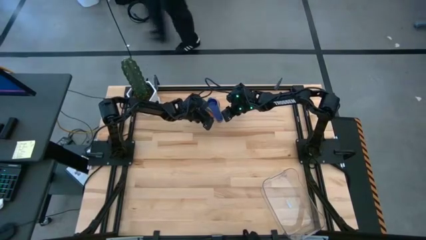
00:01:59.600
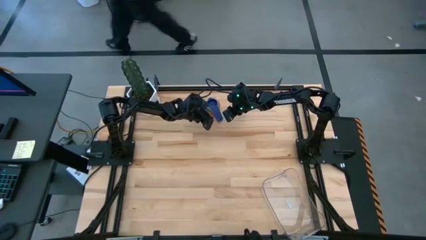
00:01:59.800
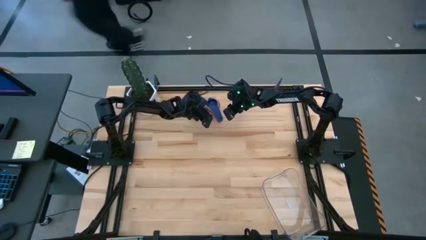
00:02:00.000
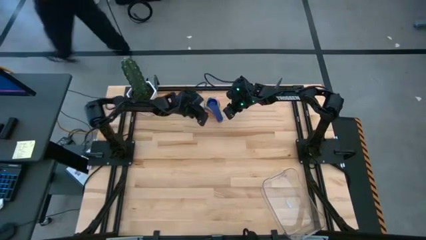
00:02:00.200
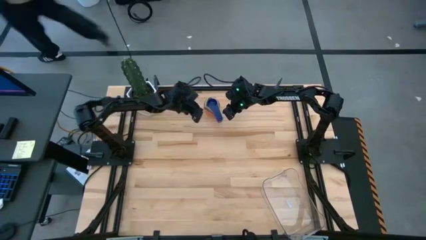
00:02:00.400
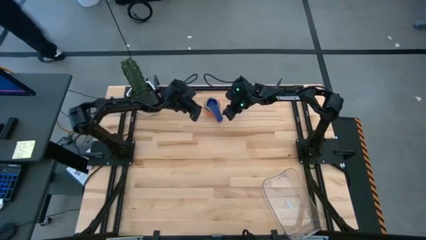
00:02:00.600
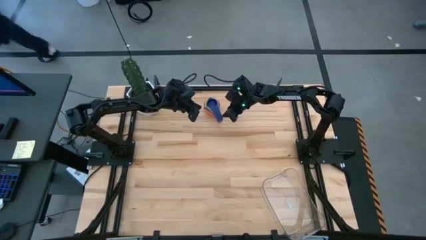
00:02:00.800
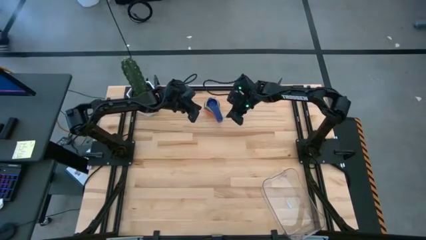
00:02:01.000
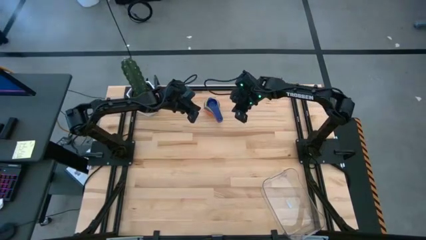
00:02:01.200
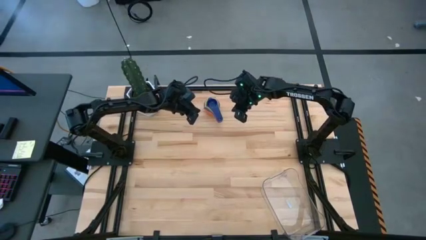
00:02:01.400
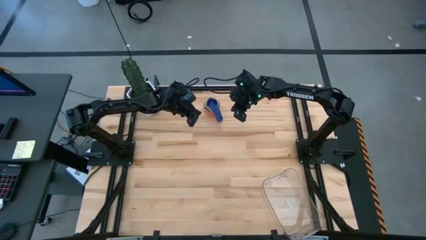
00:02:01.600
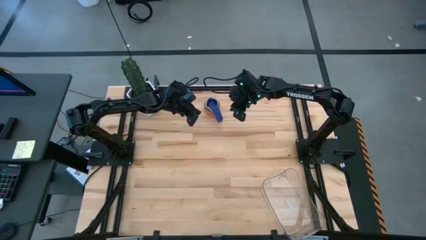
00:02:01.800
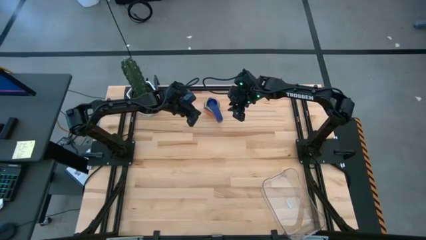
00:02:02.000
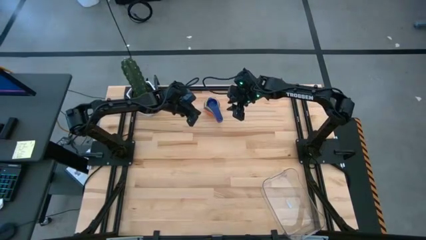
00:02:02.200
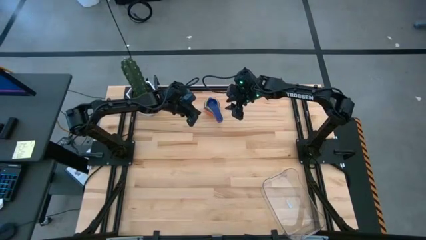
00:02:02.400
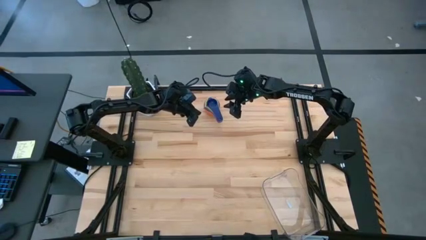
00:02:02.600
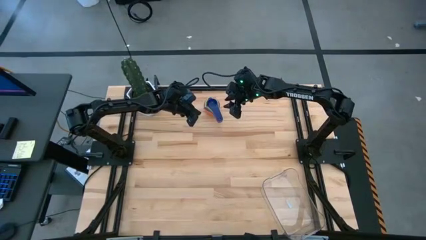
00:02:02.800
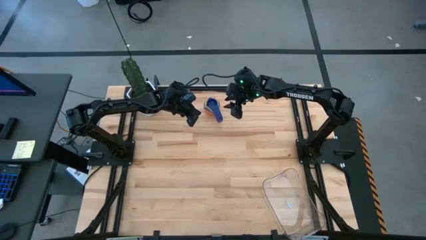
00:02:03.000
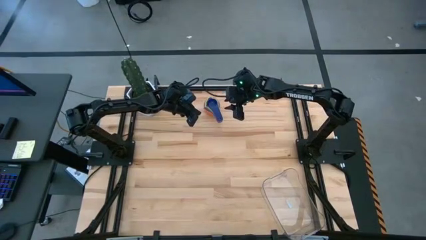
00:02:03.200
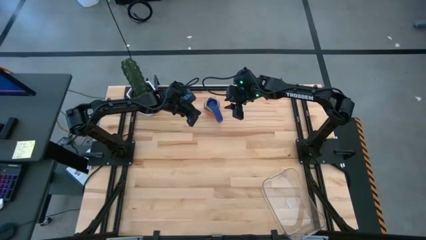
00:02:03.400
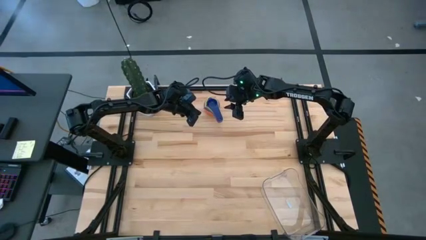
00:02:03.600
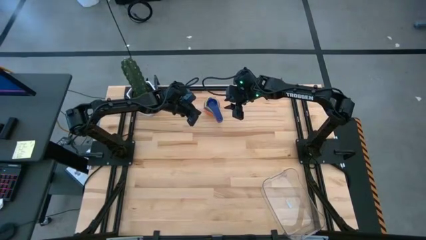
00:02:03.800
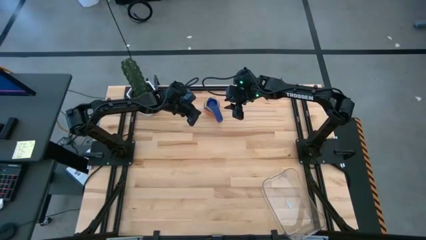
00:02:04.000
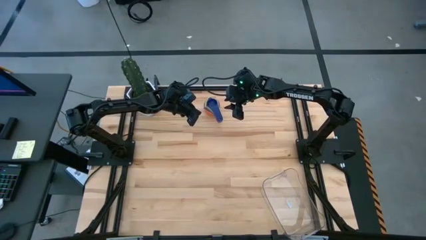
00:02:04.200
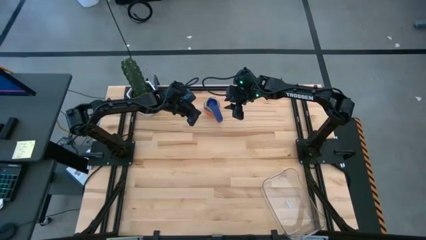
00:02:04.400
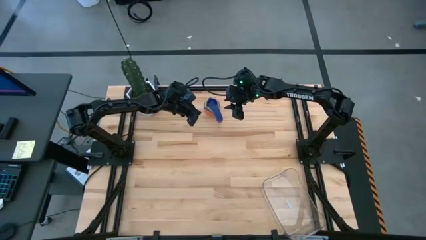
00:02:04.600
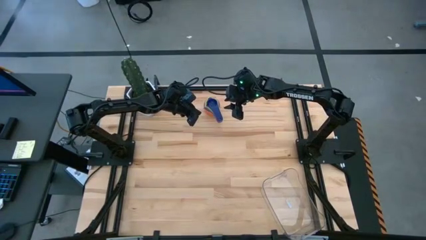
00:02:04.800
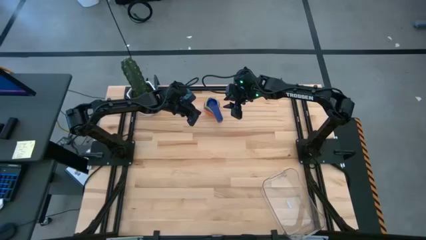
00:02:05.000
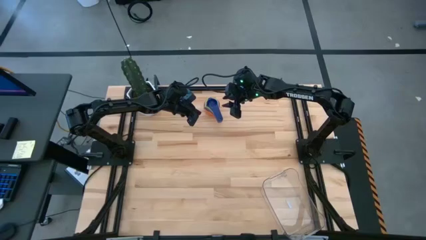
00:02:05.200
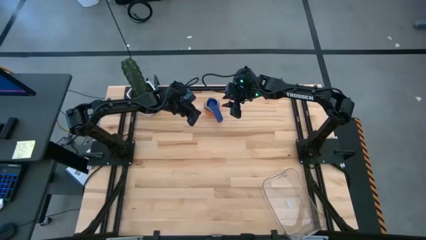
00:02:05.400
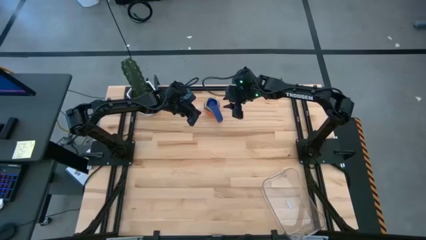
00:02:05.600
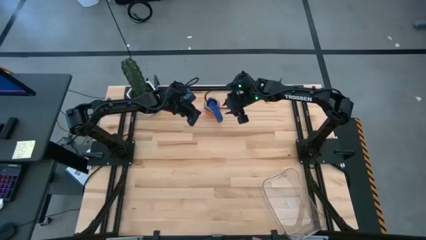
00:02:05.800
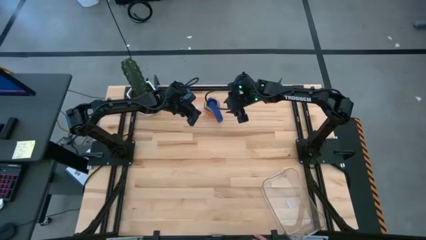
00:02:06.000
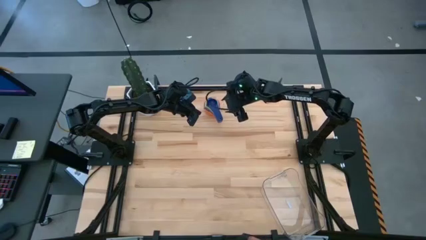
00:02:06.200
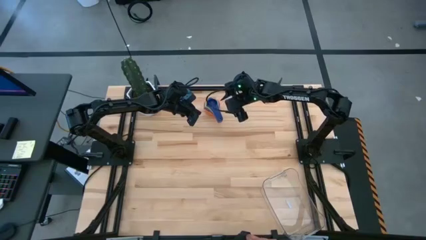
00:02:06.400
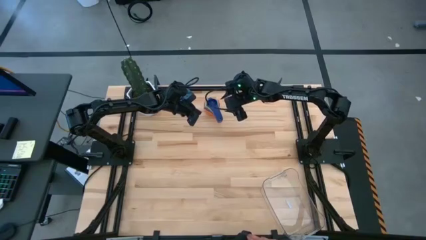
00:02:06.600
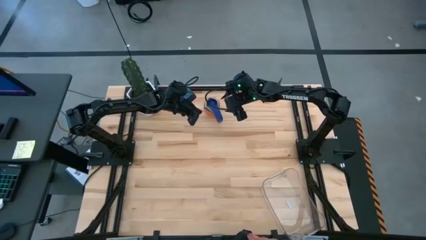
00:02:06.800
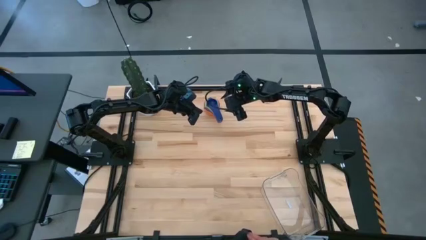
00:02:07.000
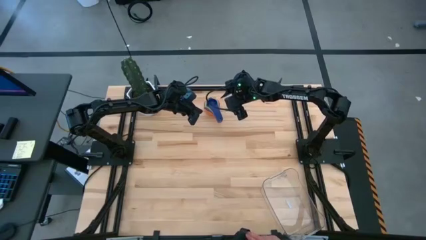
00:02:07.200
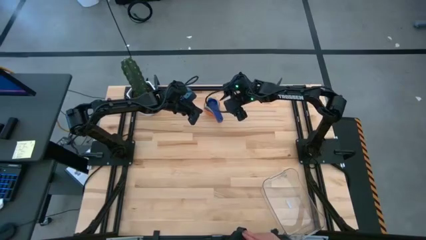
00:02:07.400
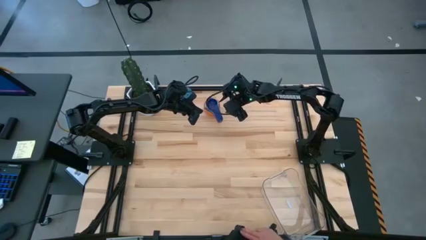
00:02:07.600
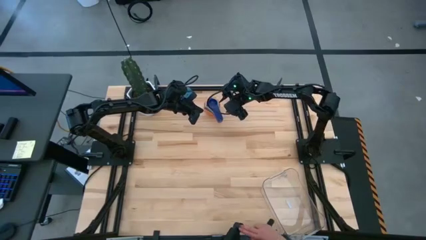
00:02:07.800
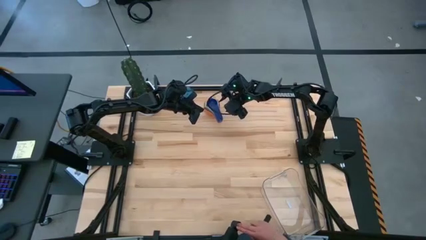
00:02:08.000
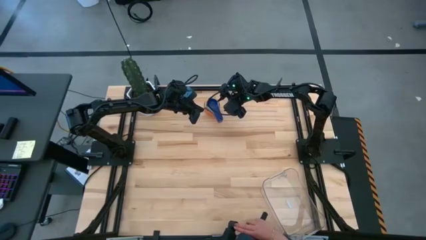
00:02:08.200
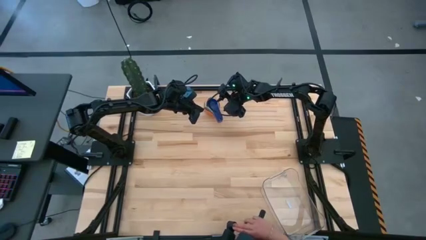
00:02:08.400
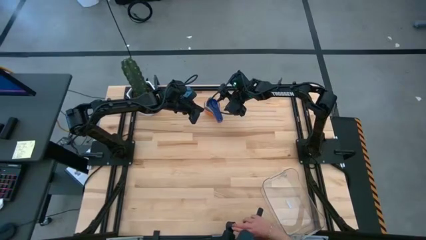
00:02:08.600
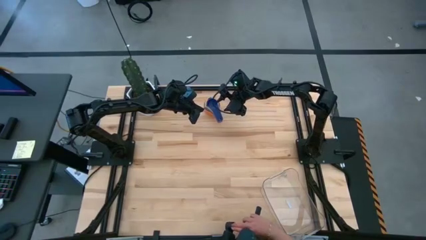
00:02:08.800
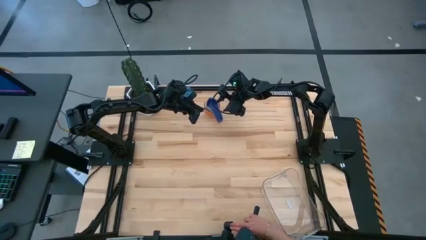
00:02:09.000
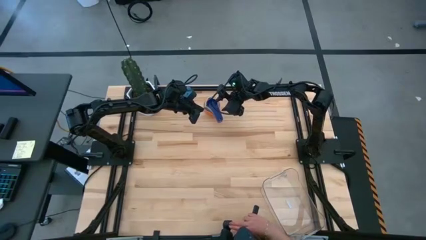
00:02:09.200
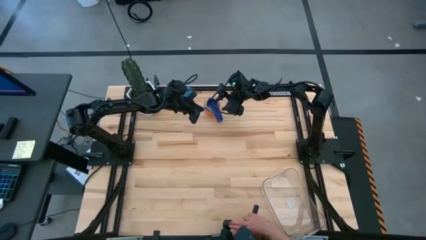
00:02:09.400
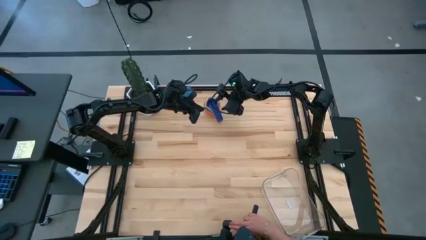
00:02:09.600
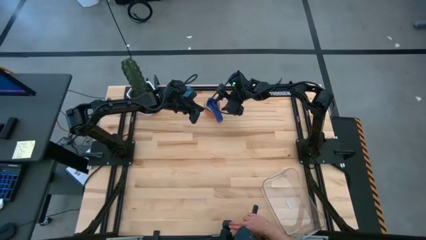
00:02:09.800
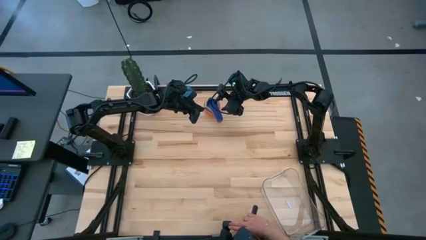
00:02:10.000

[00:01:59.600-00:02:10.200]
Task: Nest measuring cups in basket
Put the stacked measuring cups into the transparent bin
